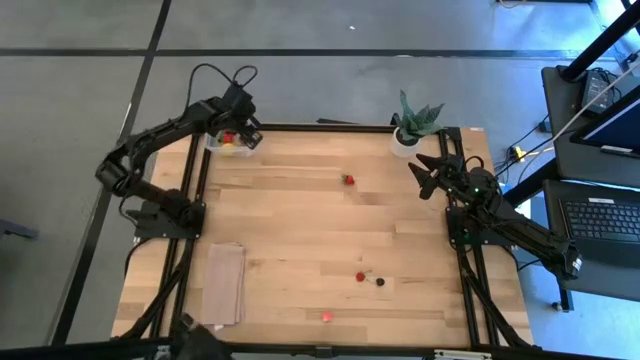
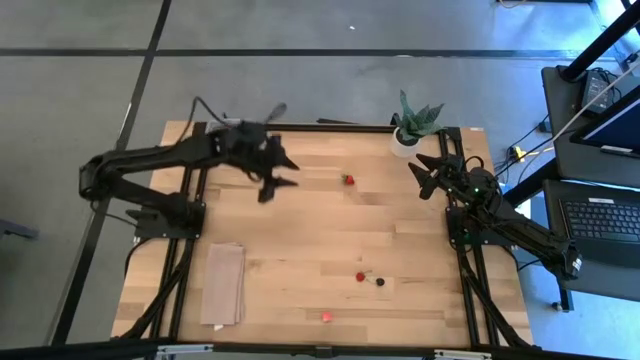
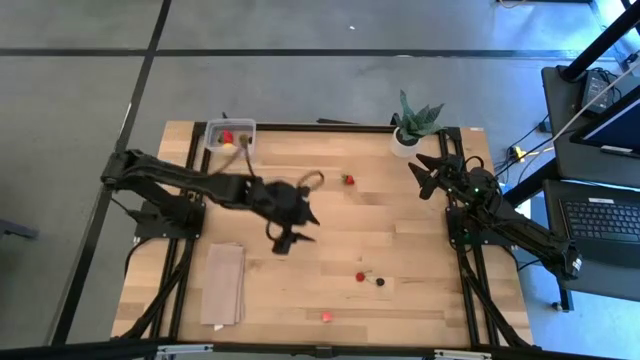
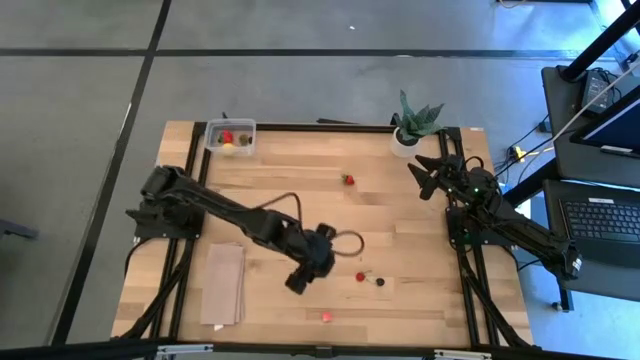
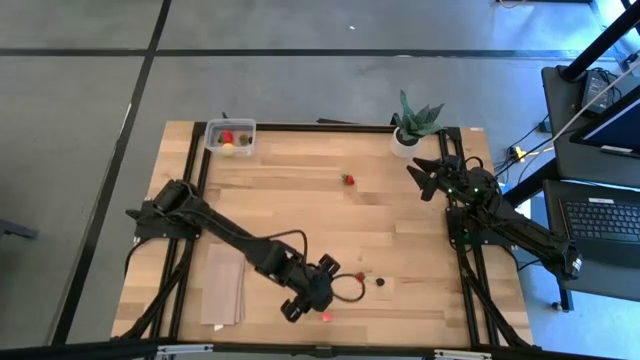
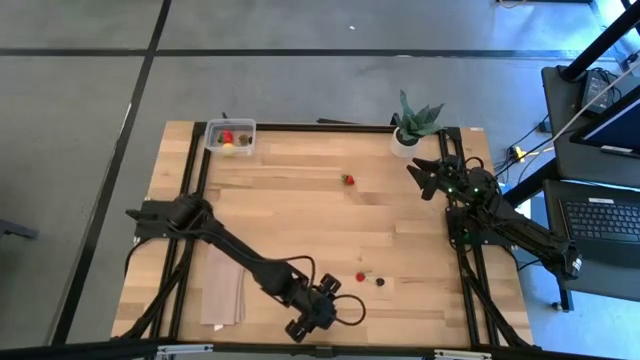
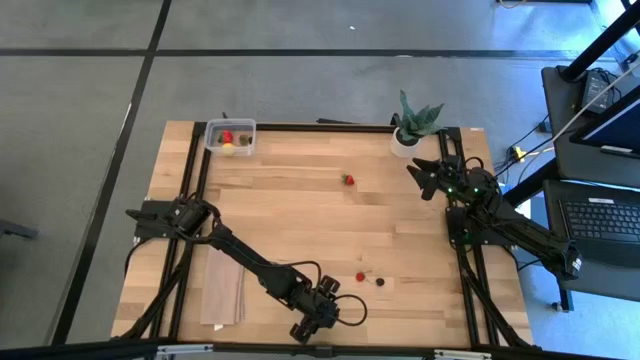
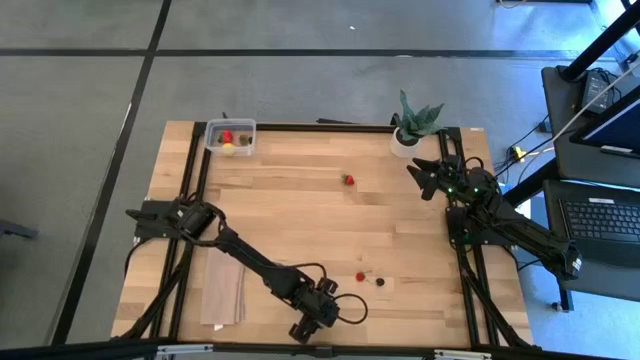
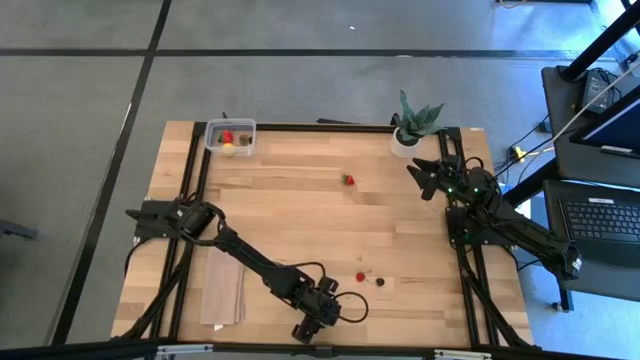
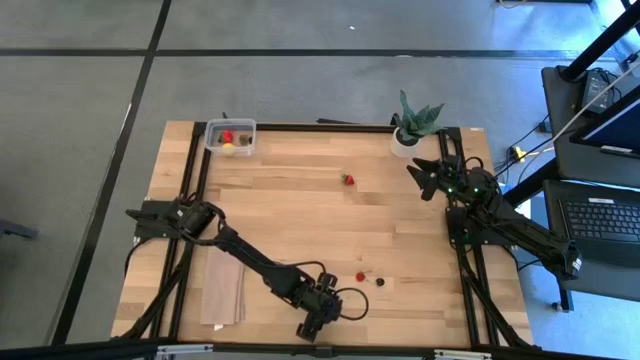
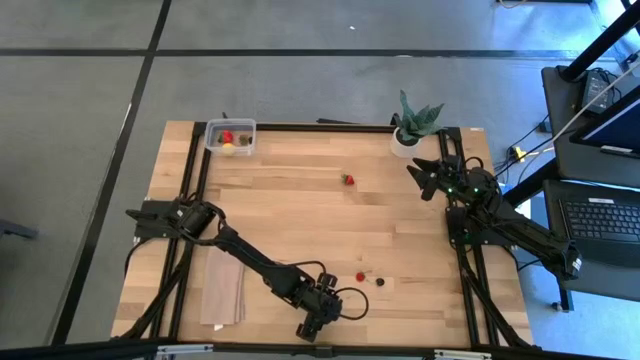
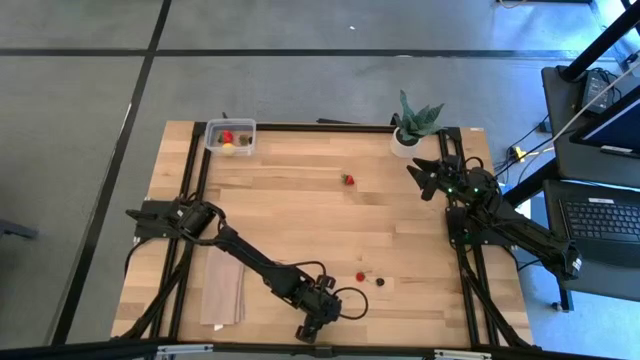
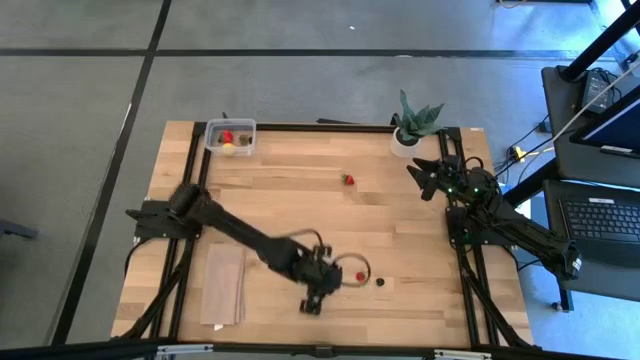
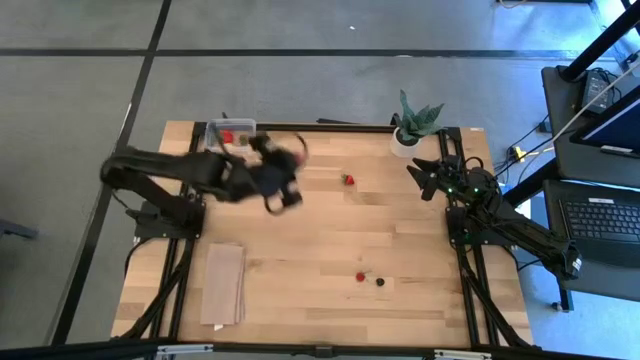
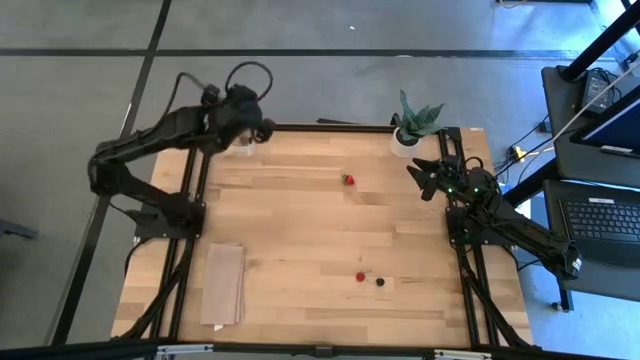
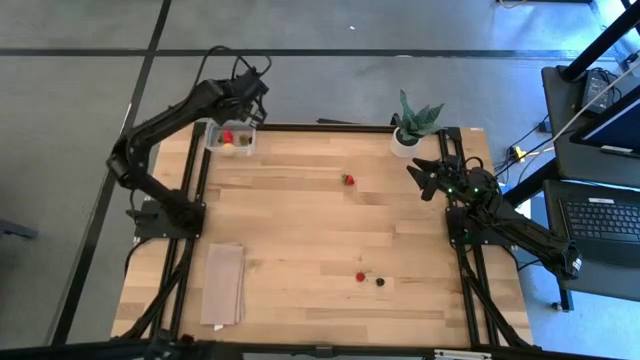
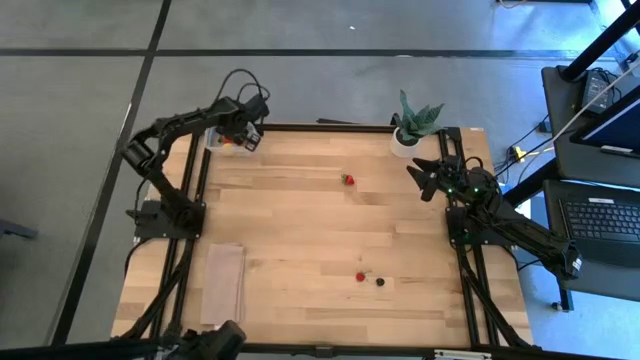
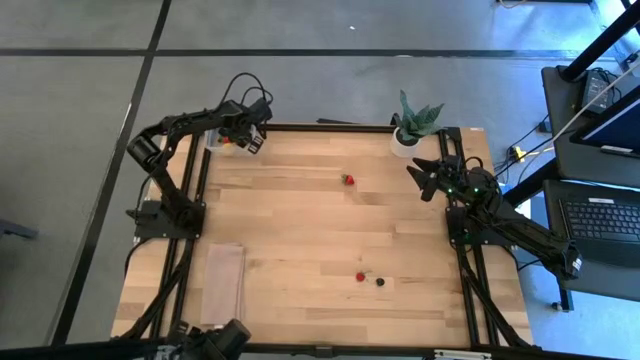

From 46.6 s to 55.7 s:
Task: Pick and placing Produce into tupperware
Put the pink peach into the transparent container

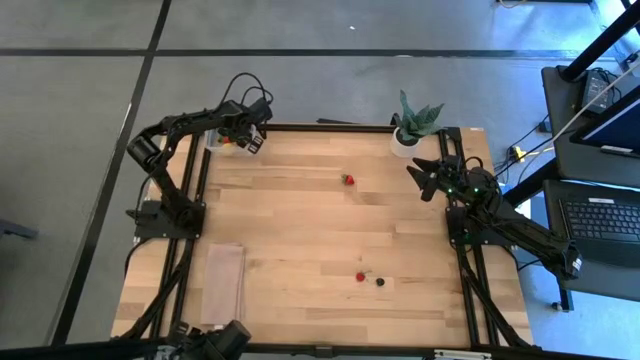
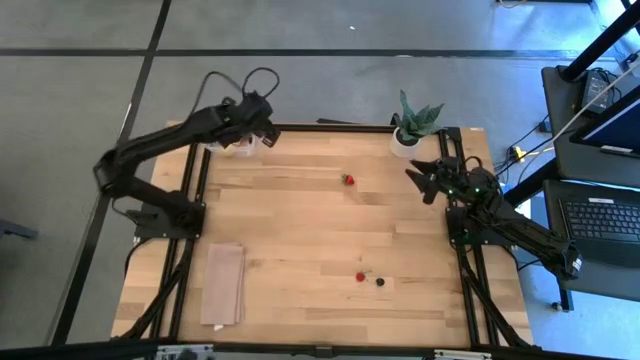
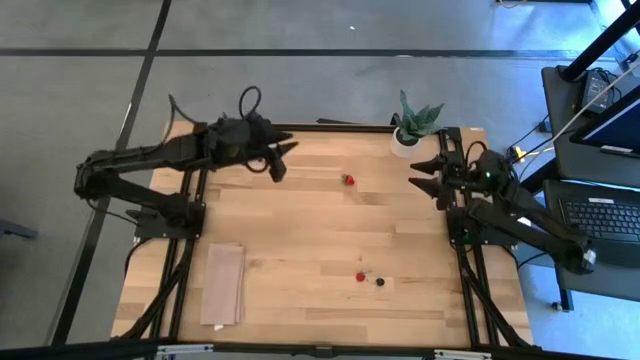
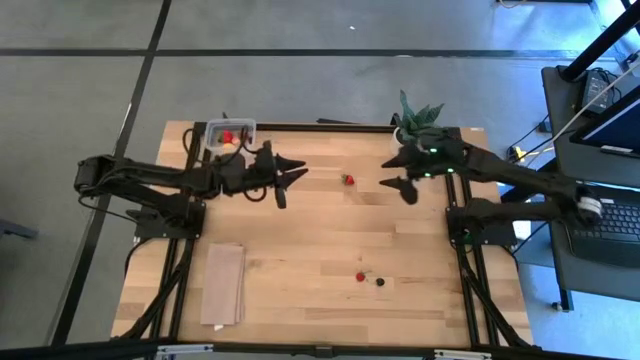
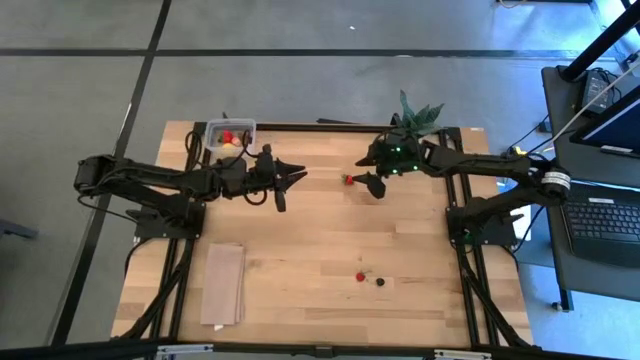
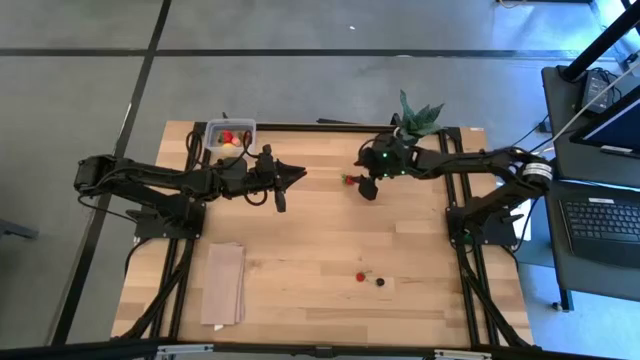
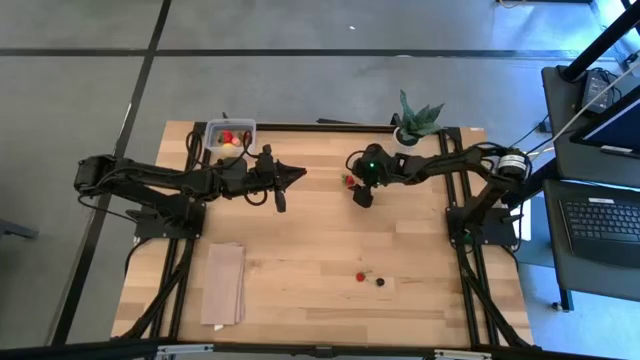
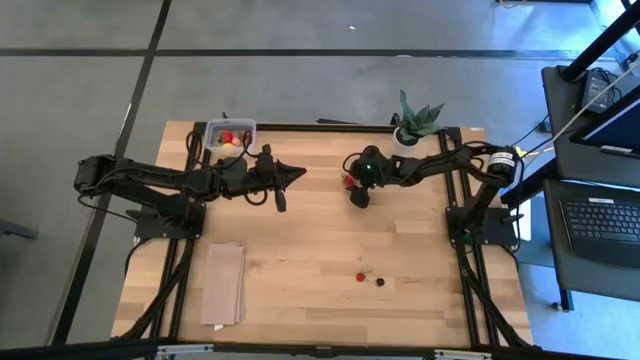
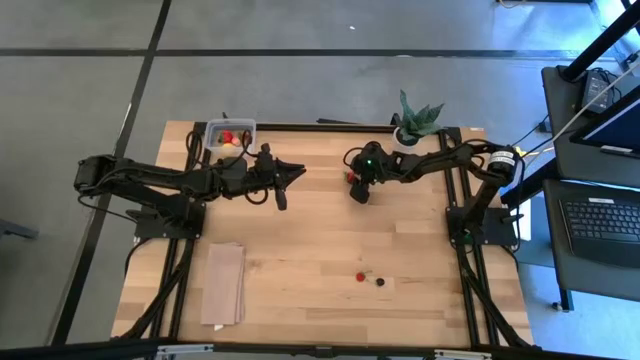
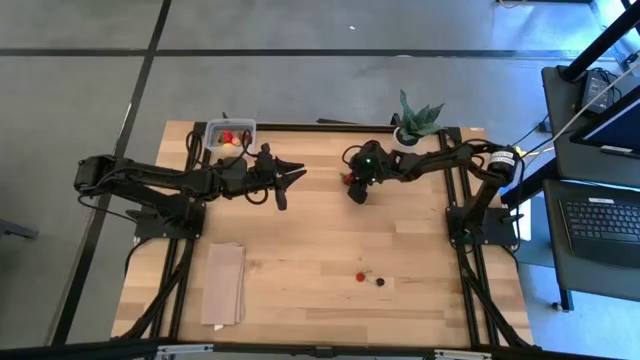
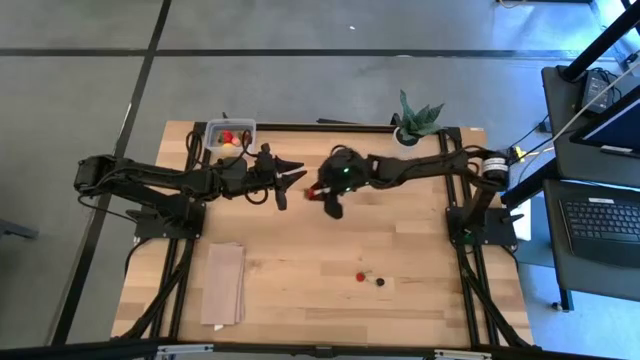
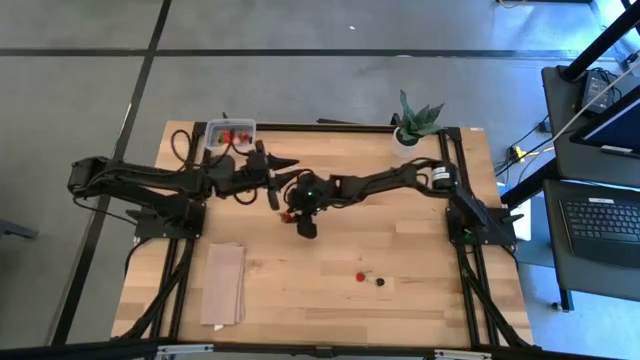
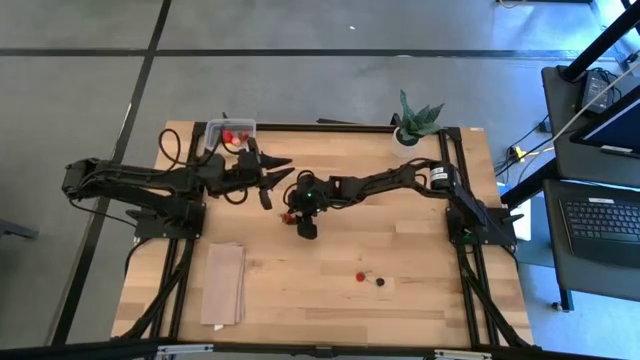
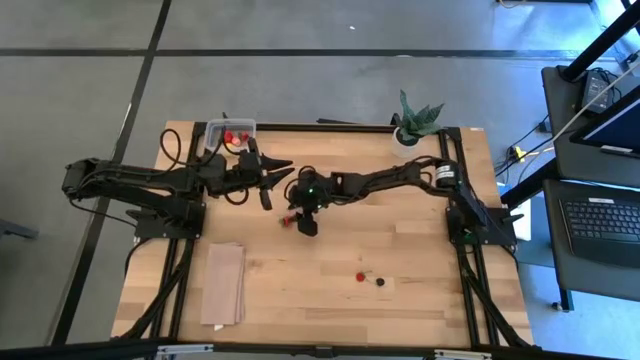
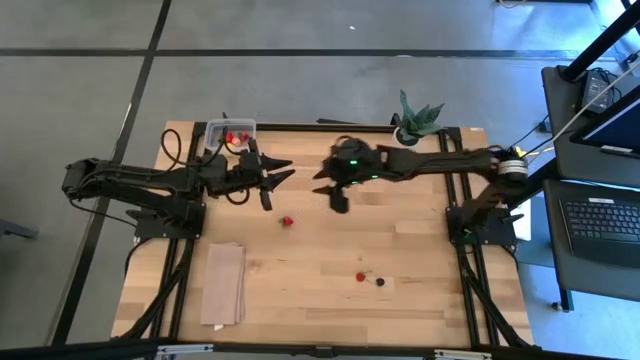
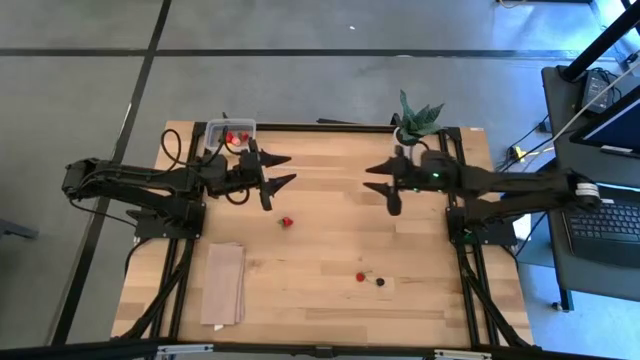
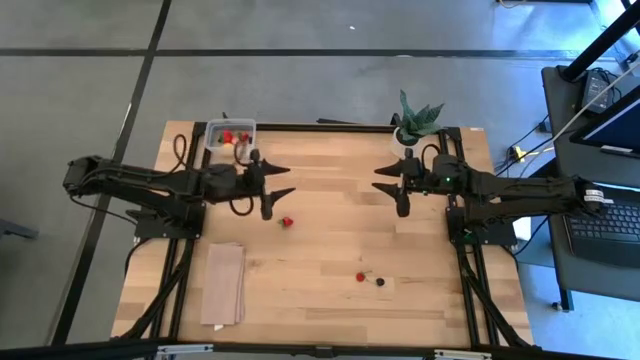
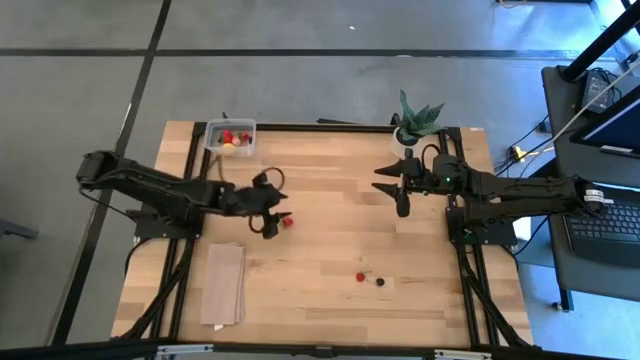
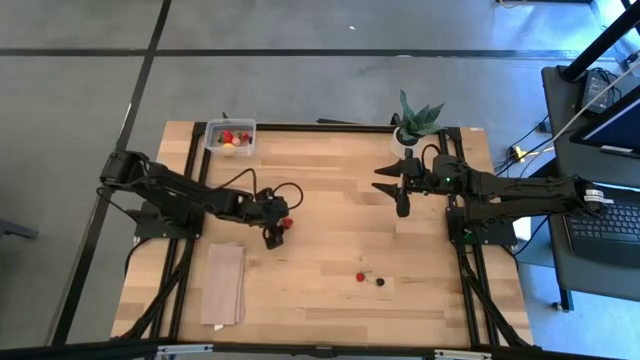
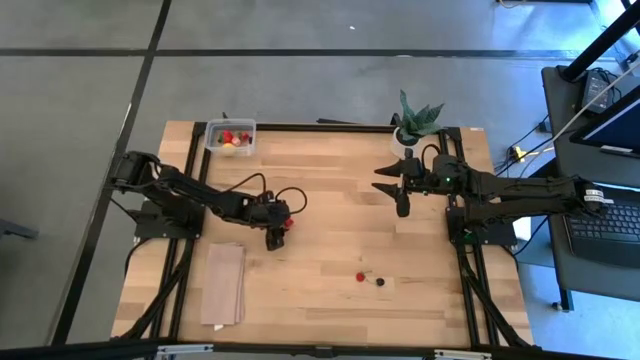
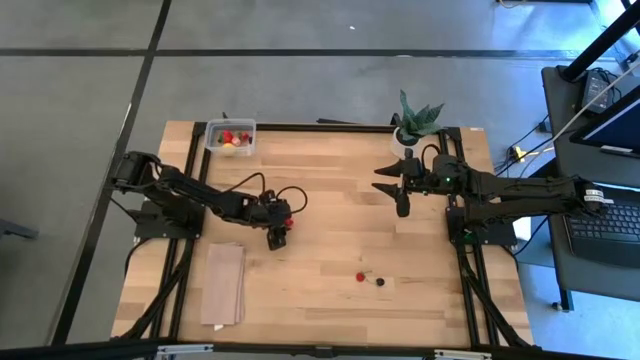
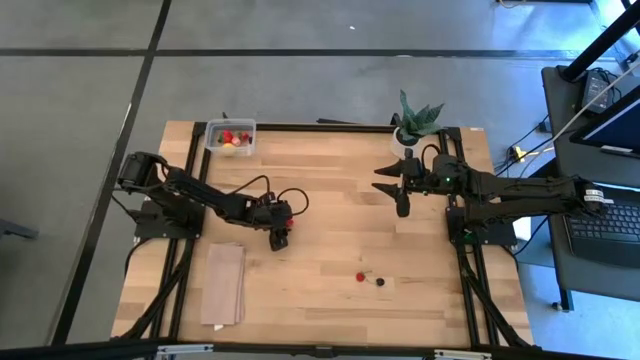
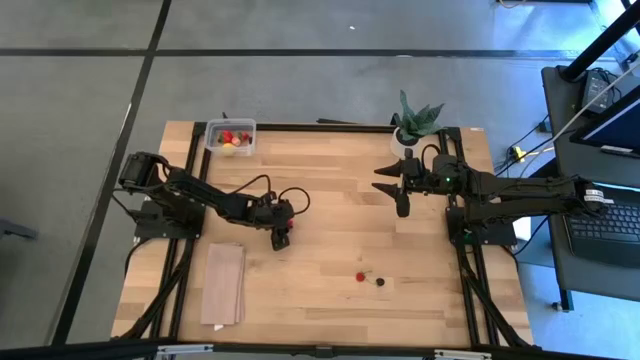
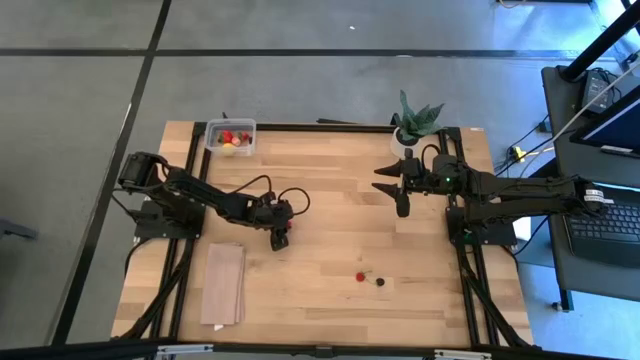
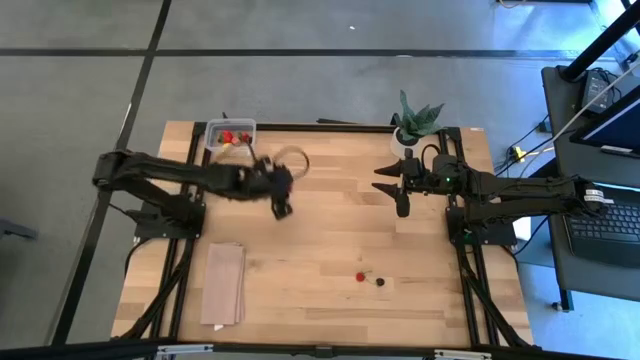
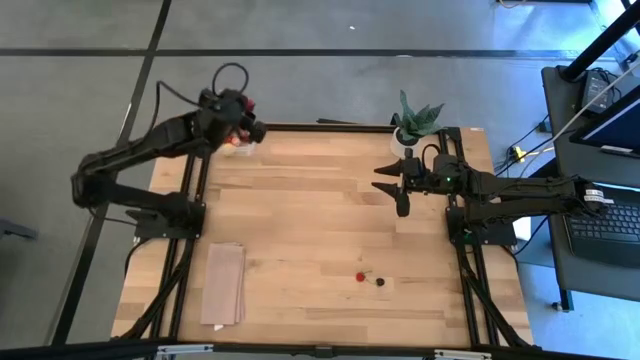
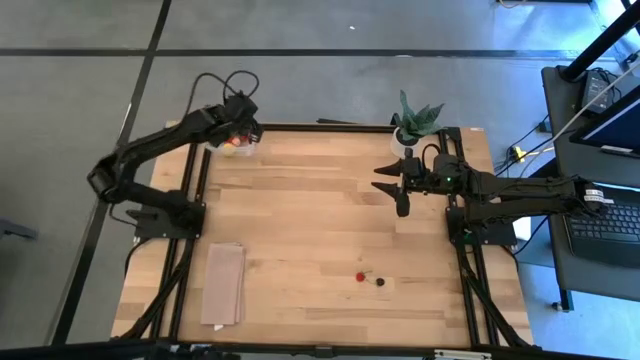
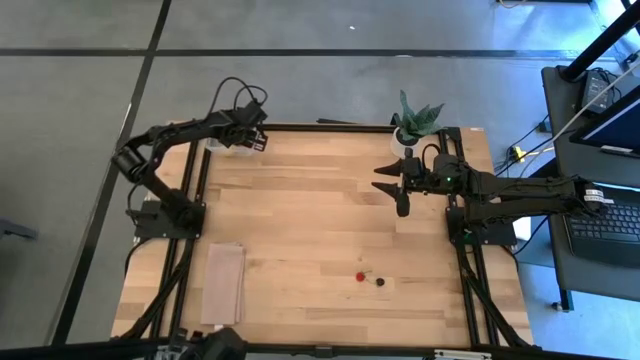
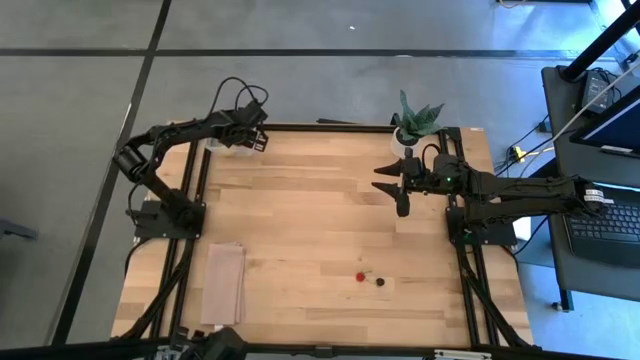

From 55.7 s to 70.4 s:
Put the red strawberry into the transparent container
